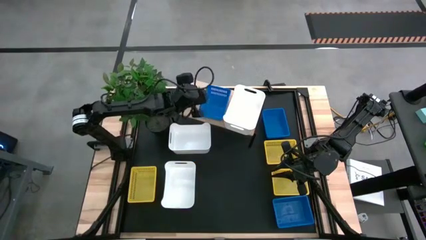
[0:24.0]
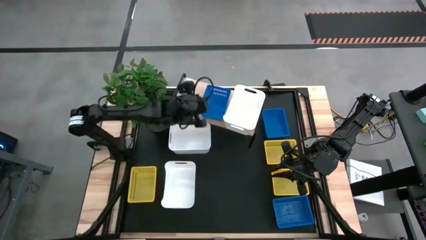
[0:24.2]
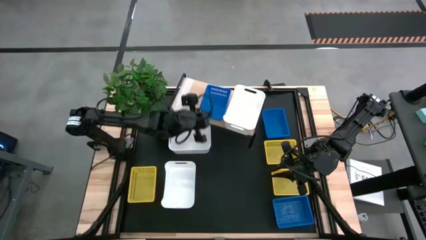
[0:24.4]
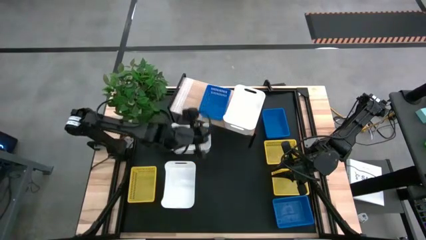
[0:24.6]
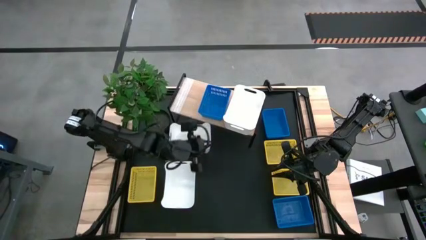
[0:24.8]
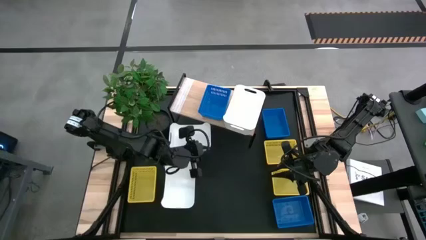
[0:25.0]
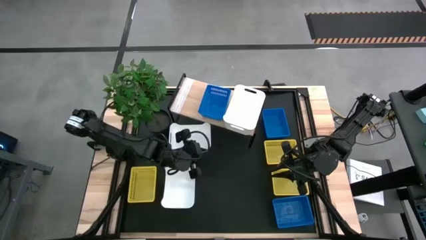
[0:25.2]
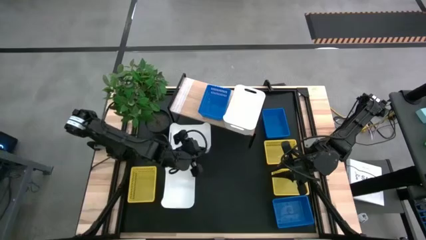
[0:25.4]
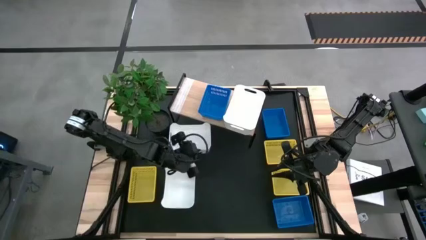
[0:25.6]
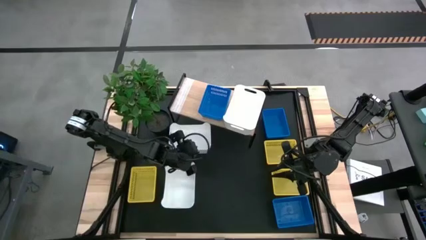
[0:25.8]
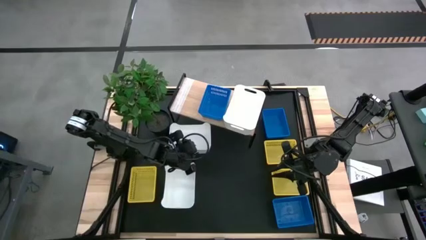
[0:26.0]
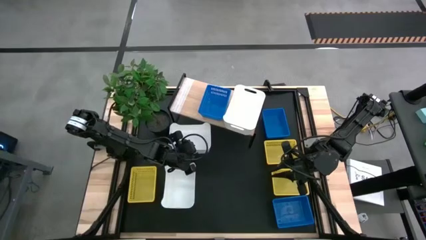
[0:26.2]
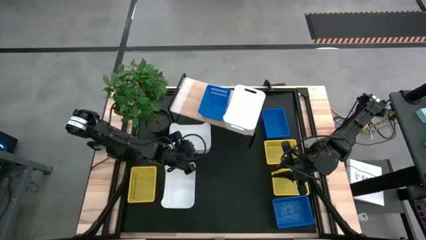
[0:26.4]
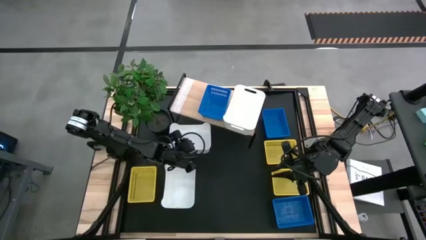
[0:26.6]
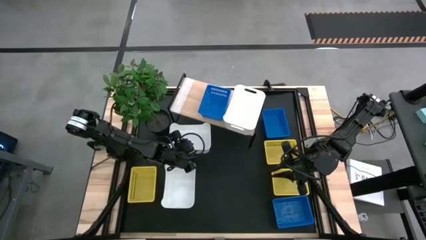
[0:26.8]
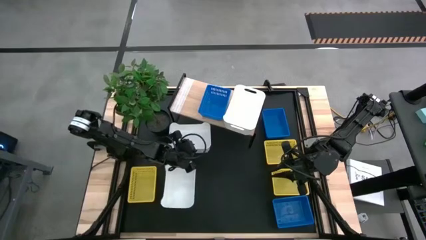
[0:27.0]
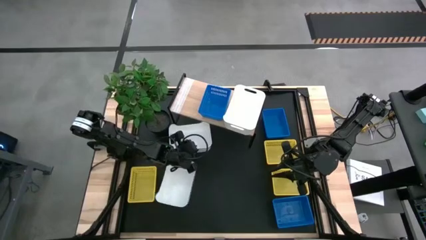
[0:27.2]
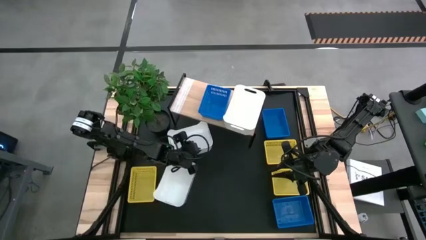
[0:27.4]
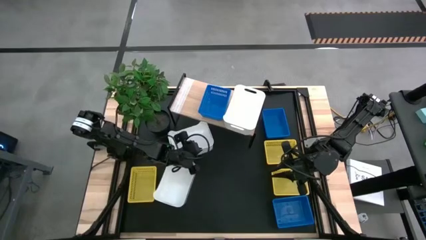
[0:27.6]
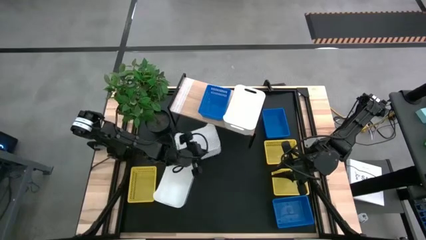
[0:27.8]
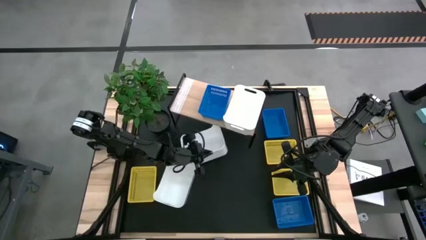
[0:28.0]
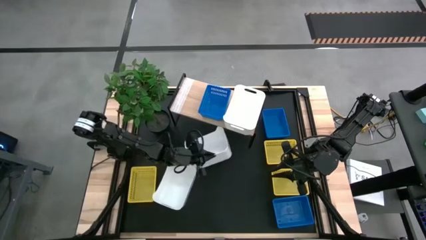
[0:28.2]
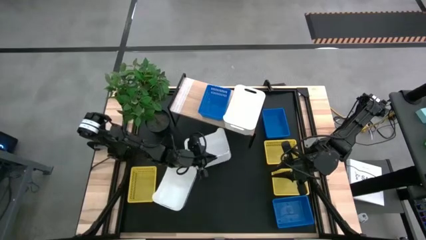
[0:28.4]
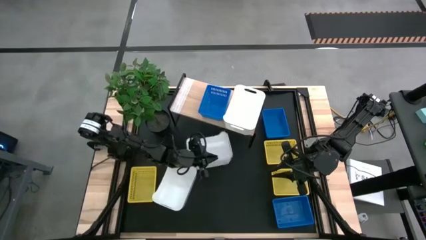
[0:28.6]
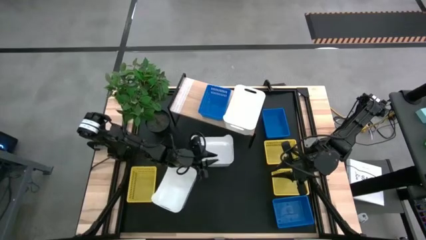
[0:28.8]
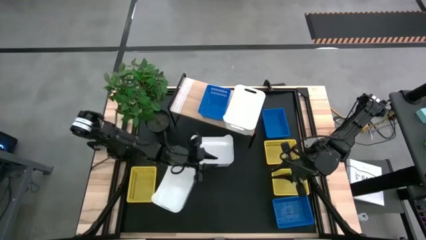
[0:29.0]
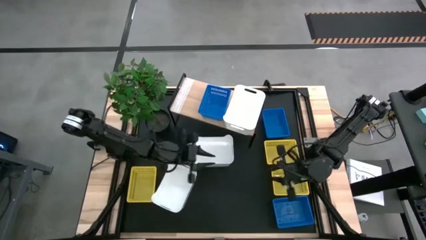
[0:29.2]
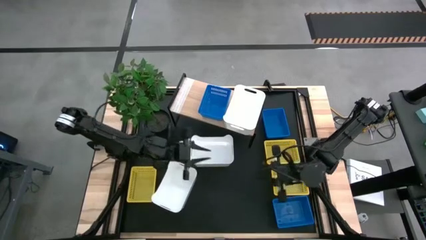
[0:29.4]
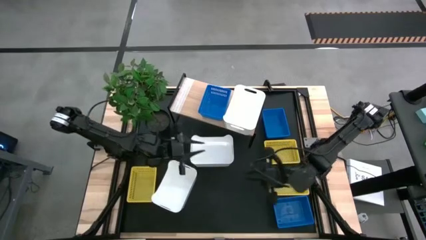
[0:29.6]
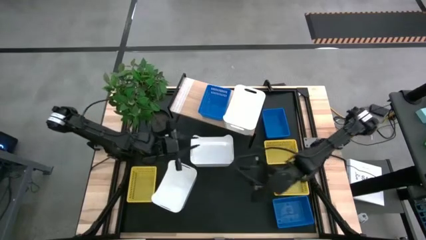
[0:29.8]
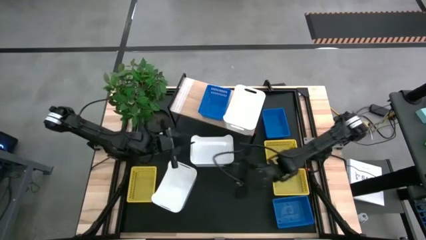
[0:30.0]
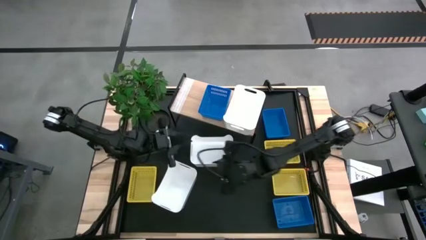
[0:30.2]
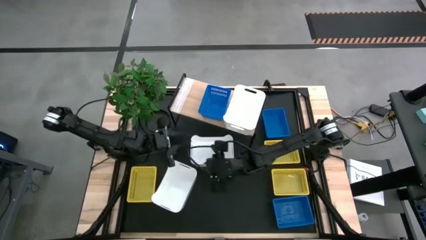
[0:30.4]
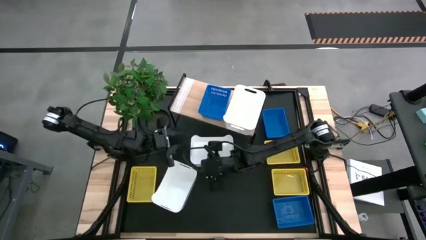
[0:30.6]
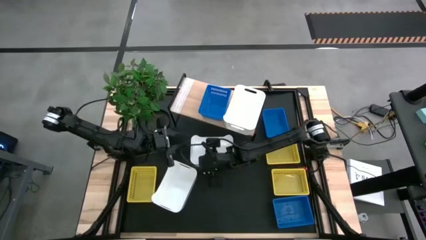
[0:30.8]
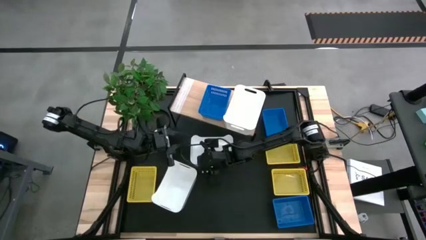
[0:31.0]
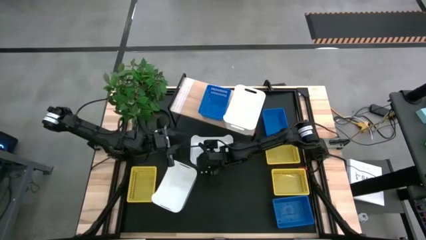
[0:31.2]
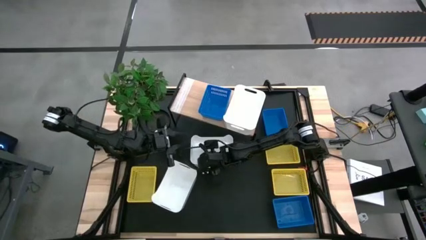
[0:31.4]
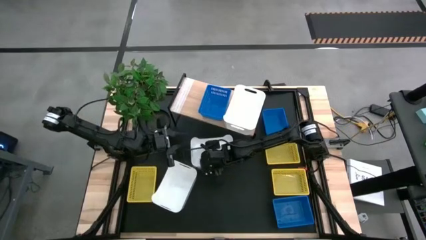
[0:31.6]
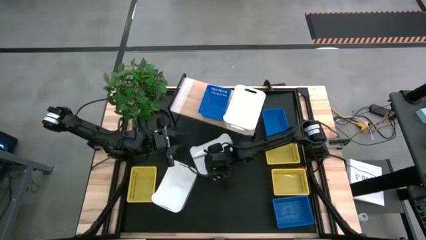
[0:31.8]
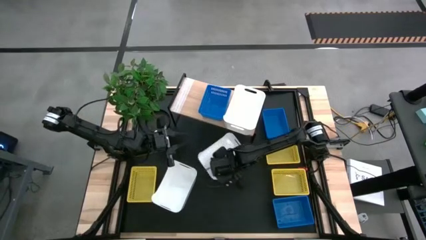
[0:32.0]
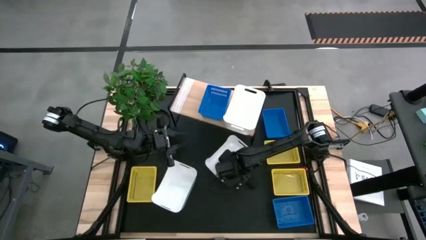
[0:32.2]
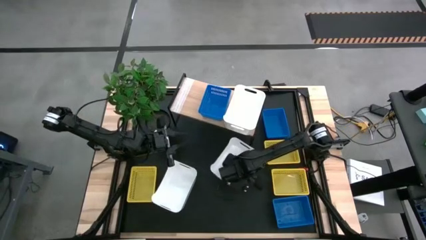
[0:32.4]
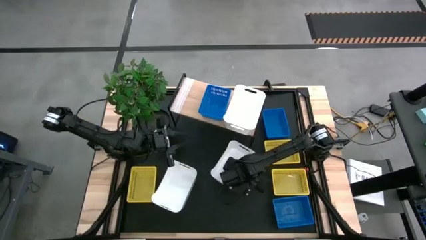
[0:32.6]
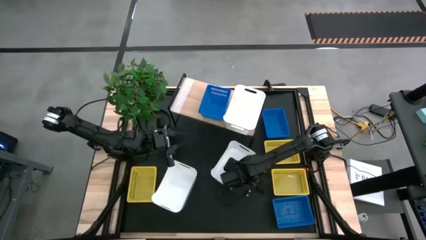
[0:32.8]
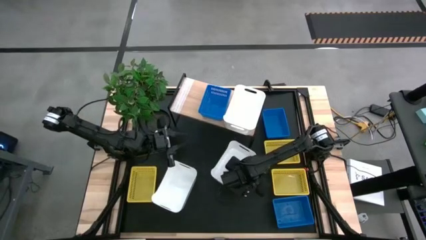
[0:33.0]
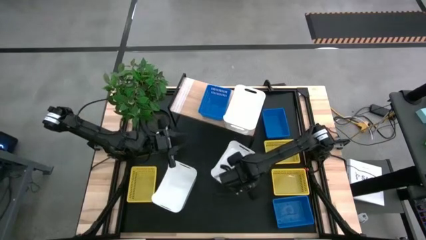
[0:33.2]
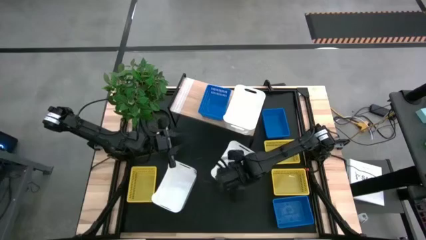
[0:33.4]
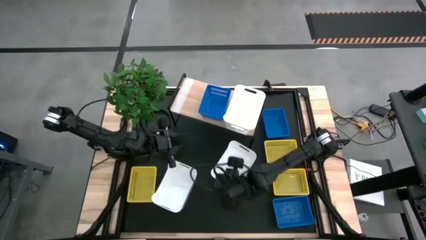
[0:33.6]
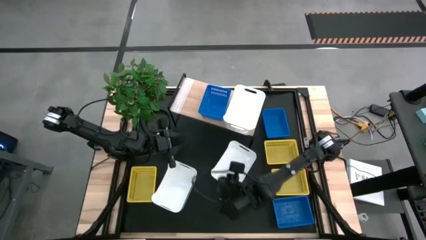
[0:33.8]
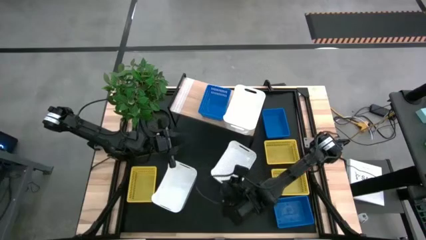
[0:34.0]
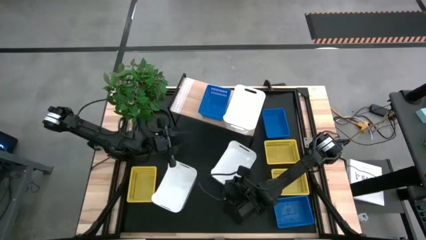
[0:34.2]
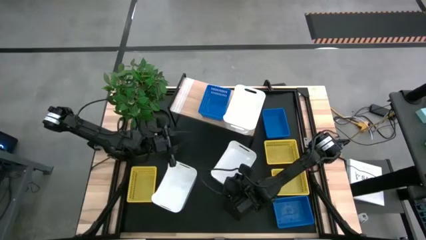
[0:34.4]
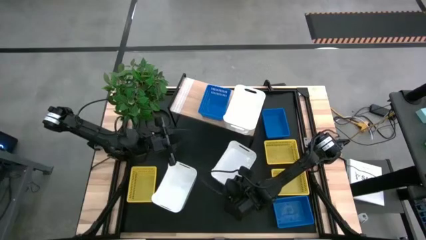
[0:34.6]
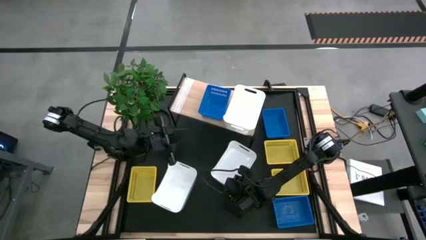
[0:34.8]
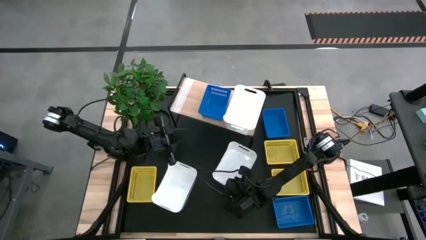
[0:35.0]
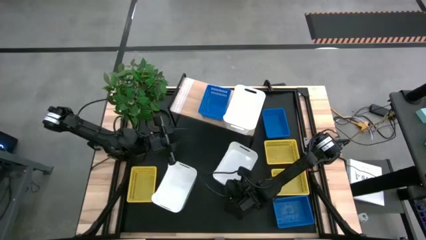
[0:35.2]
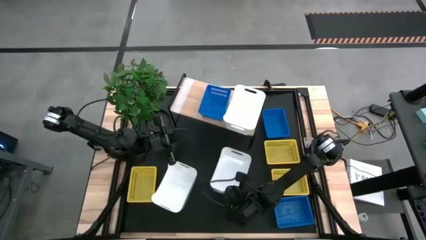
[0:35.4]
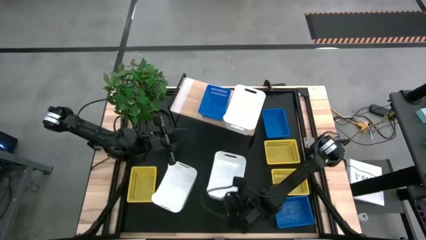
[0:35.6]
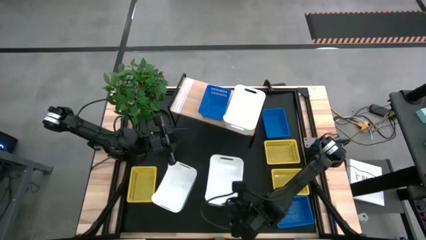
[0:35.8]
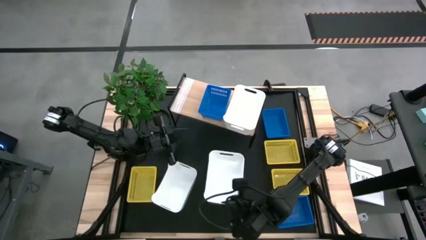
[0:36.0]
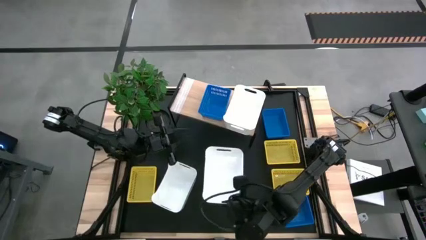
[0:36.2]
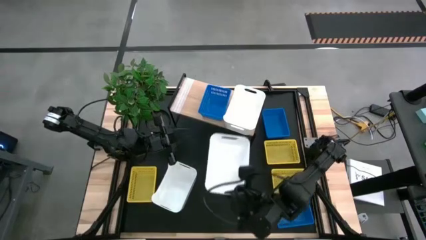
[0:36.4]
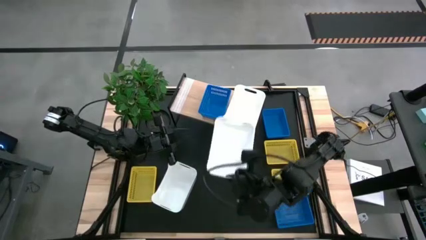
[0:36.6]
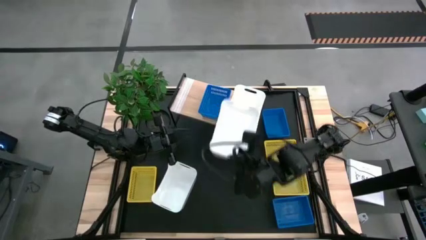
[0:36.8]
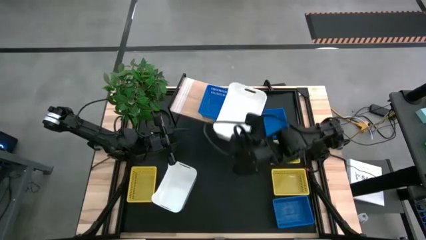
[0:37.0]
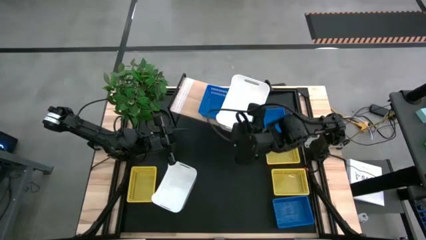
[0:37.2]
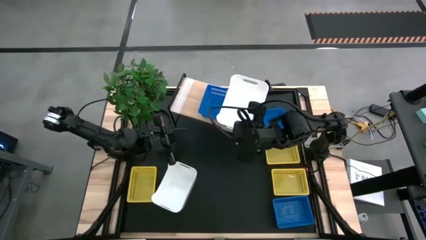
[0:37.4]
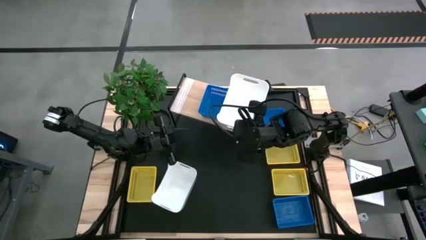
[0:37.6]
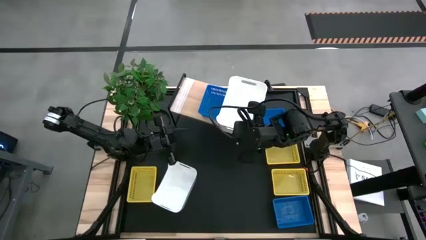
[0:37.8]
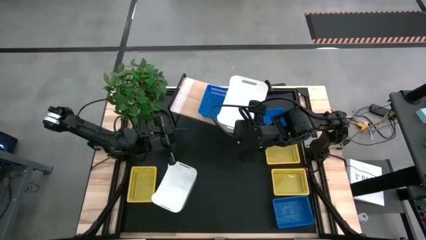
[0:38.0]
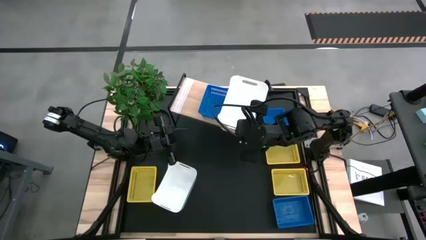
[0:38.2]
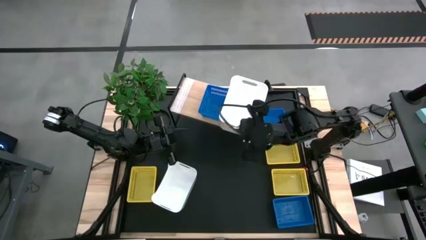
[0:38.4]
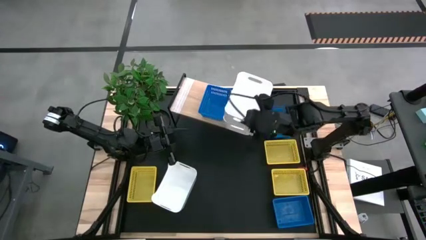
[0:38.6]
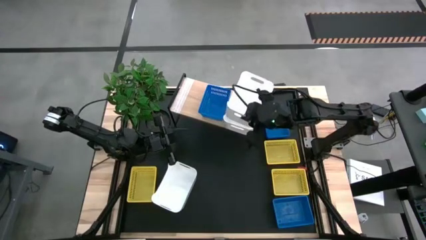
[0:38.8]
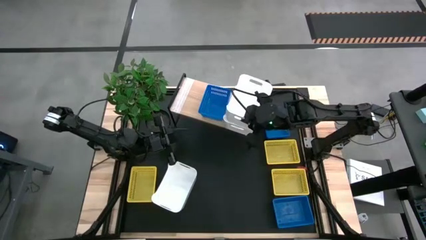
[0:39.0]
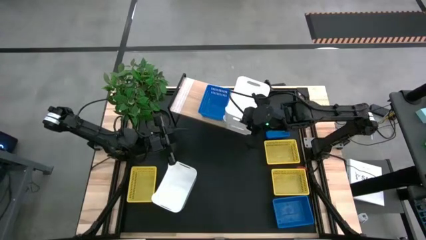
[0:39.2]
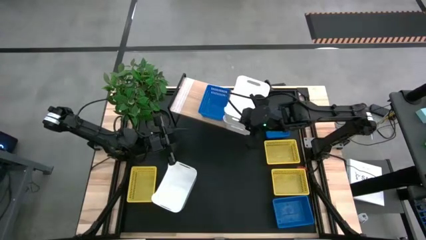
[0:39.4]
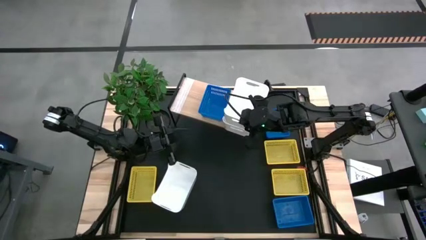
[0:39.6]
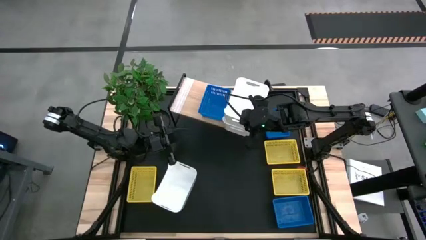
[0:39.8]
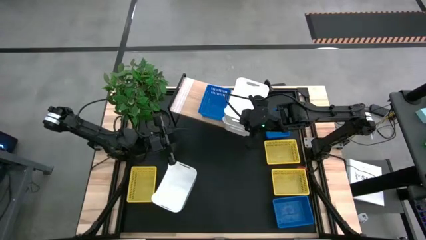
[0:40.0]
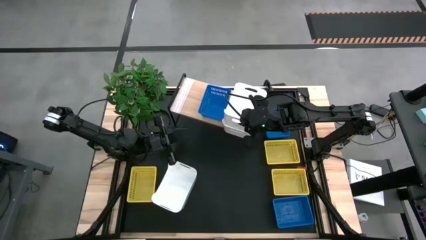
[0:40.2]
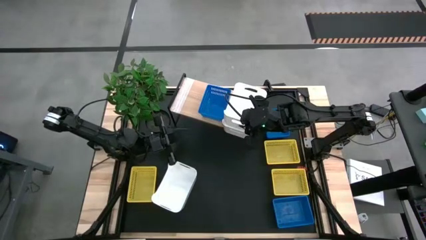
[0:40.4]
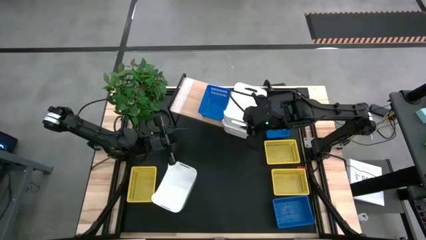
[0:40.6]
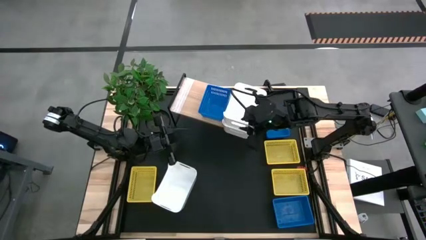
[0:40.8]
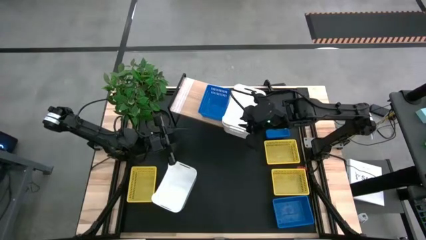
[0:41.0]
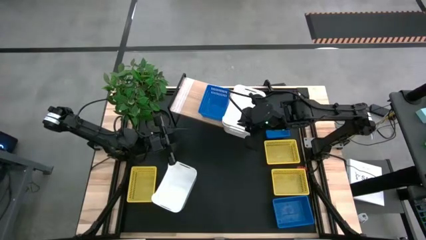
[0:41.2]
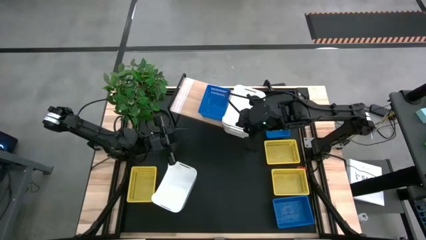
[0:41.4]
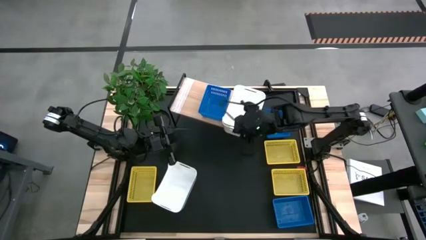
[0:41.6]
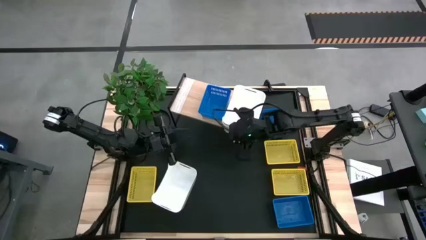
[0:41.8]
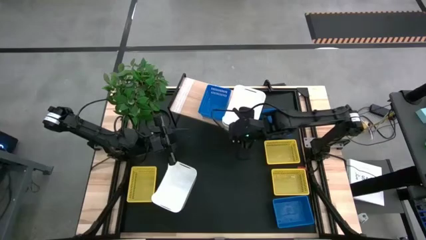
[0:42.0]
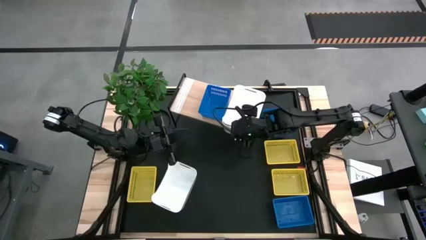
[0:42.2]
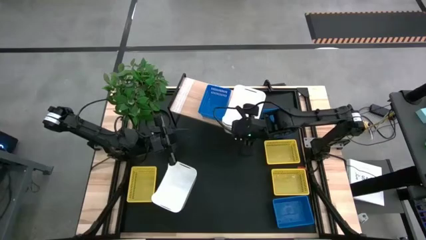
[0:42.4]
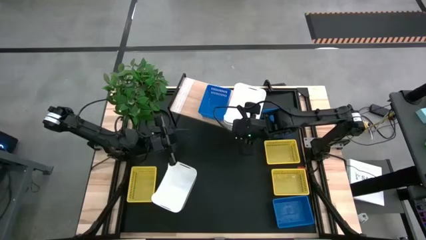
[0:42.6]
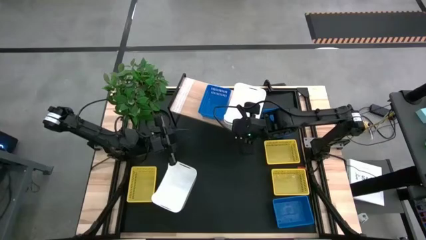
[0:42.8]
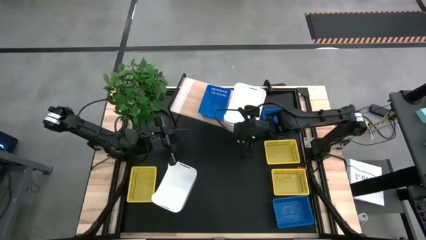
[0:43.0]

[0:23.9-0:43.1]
Task: Stack baskets on shelf by color
Stack the top white bin on top of the other white bin on the shelf
